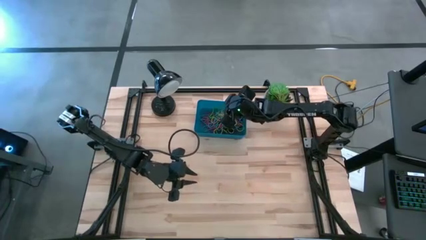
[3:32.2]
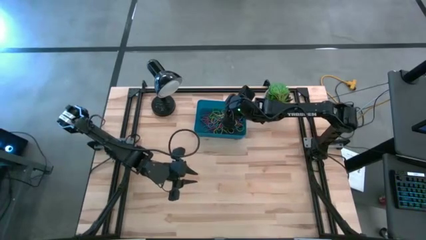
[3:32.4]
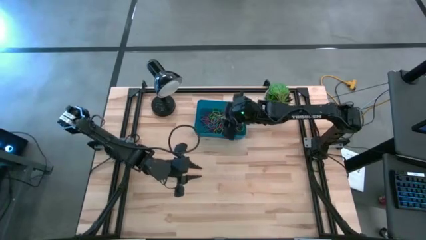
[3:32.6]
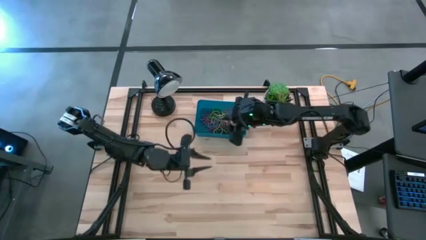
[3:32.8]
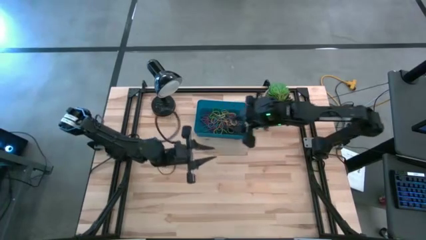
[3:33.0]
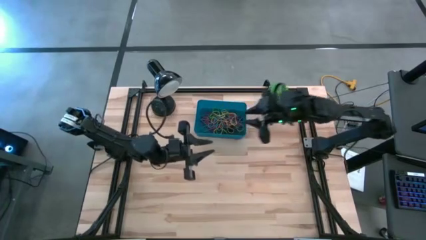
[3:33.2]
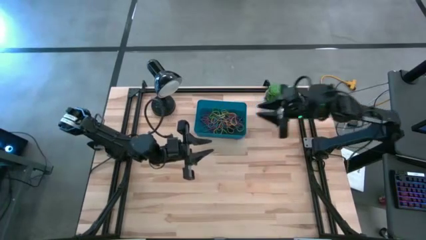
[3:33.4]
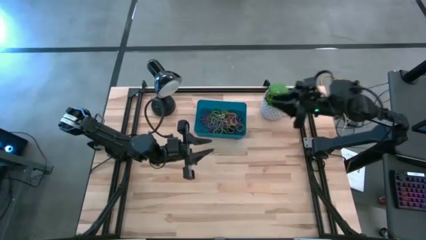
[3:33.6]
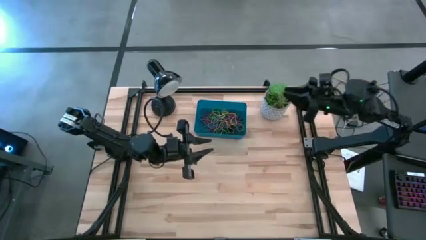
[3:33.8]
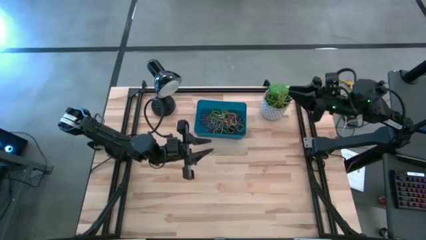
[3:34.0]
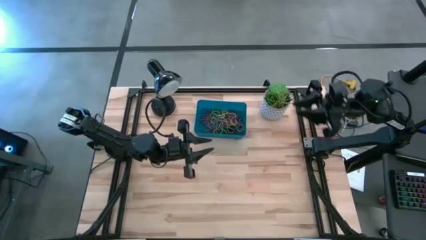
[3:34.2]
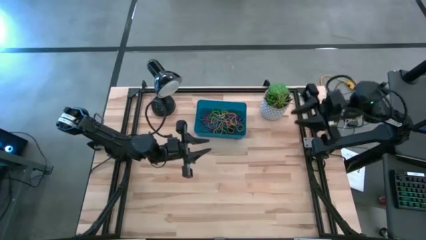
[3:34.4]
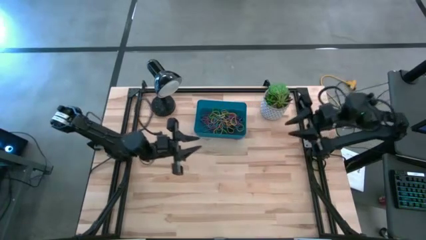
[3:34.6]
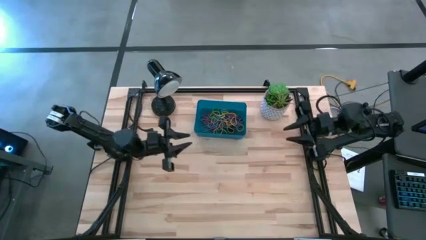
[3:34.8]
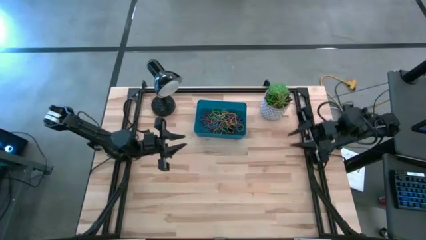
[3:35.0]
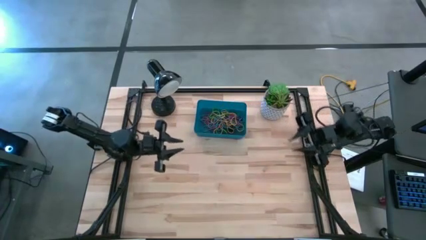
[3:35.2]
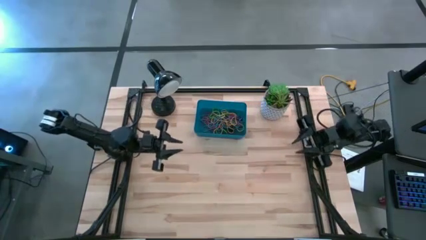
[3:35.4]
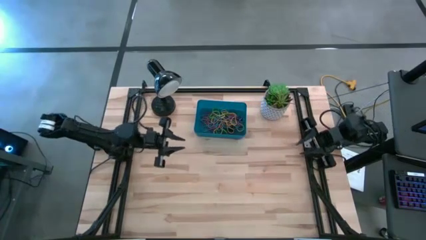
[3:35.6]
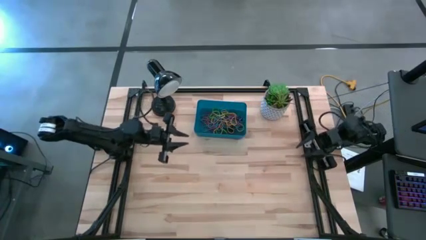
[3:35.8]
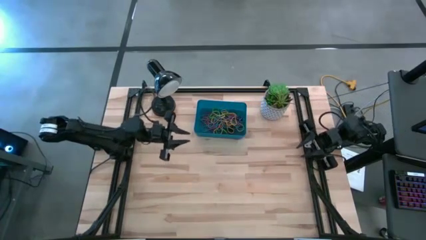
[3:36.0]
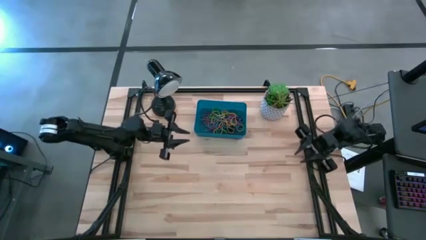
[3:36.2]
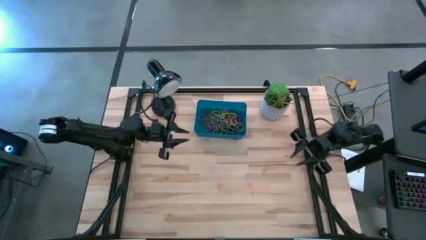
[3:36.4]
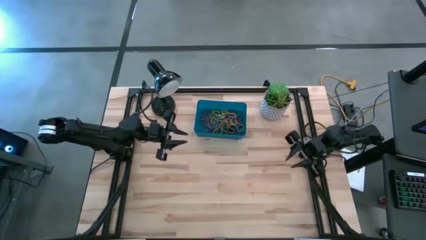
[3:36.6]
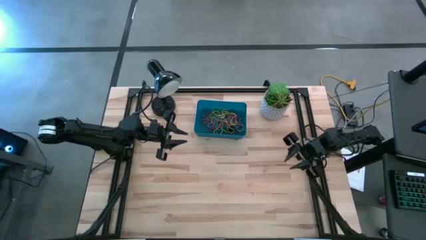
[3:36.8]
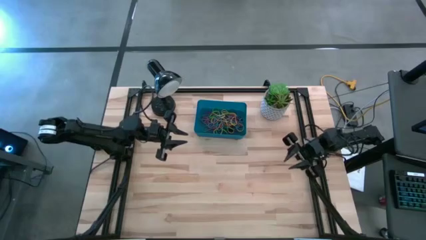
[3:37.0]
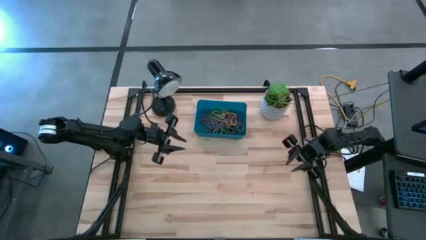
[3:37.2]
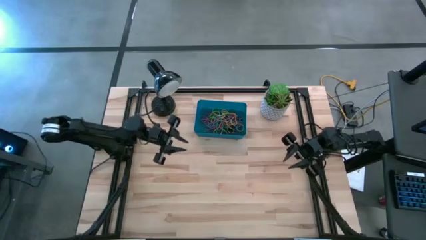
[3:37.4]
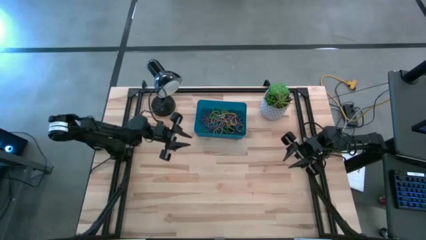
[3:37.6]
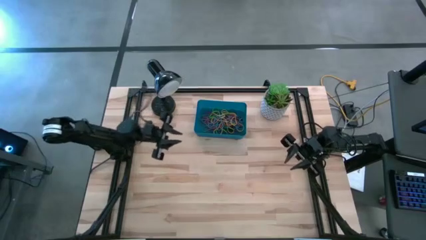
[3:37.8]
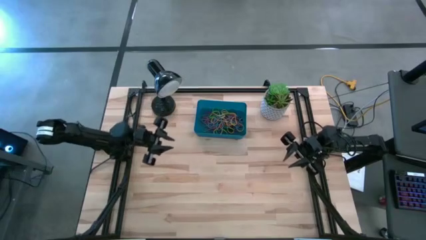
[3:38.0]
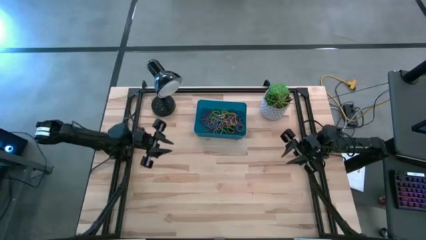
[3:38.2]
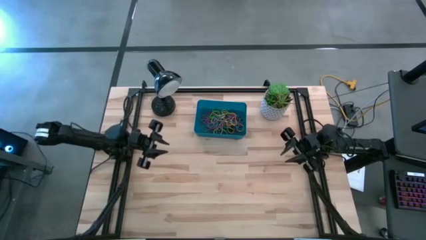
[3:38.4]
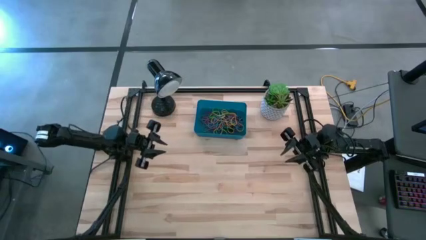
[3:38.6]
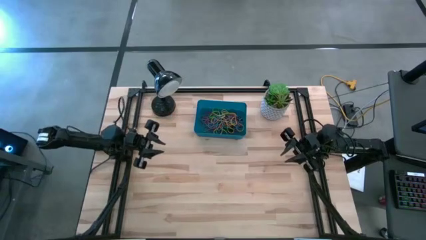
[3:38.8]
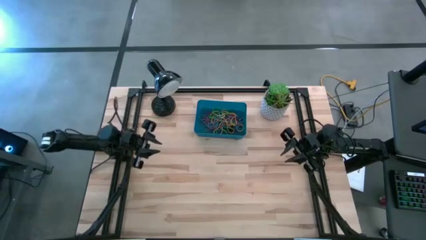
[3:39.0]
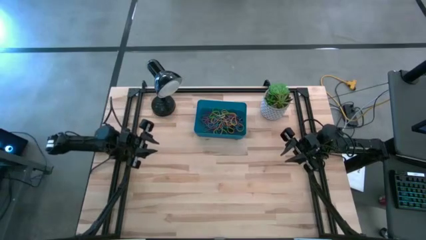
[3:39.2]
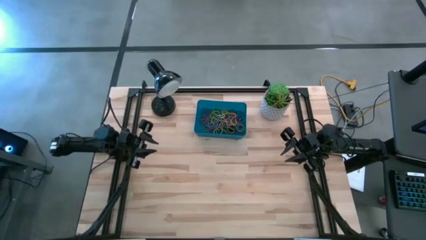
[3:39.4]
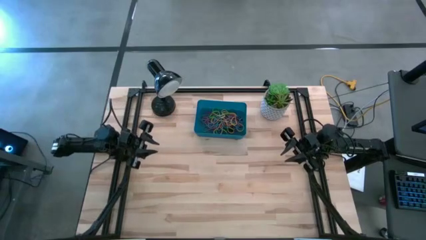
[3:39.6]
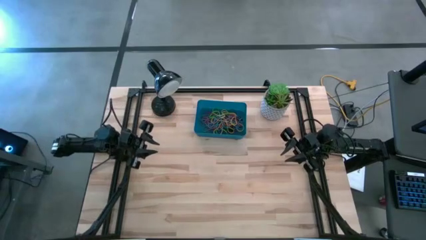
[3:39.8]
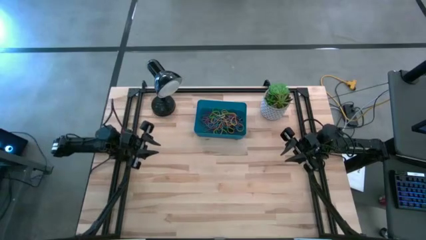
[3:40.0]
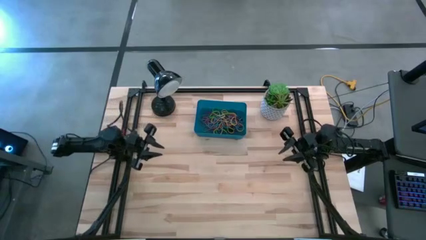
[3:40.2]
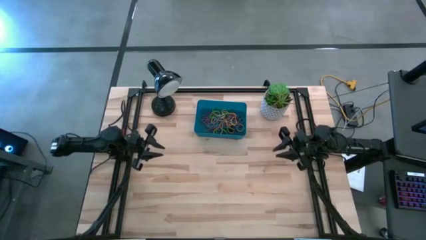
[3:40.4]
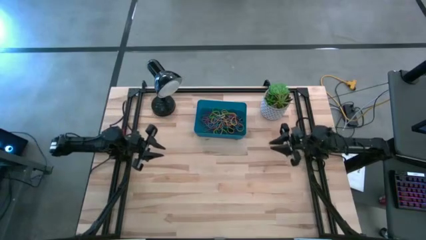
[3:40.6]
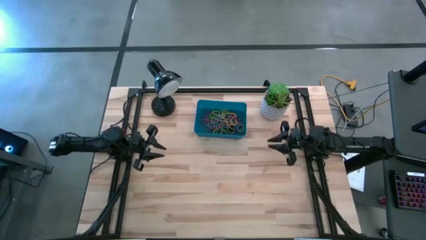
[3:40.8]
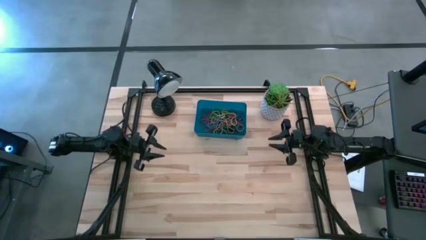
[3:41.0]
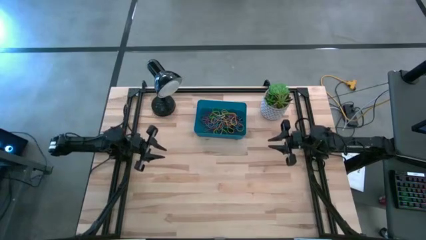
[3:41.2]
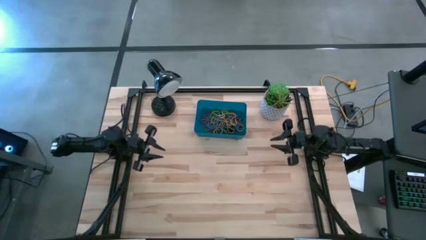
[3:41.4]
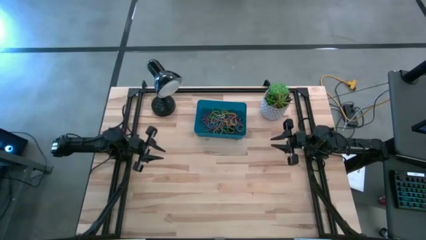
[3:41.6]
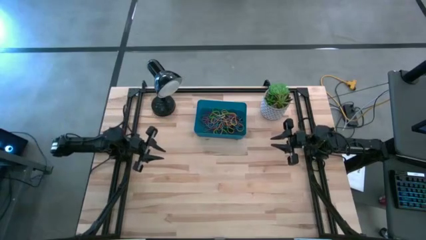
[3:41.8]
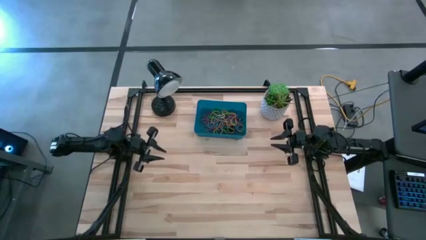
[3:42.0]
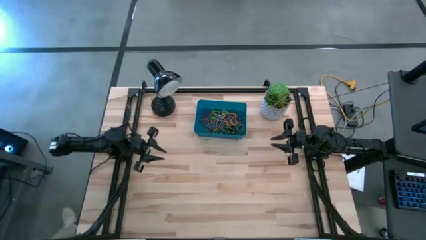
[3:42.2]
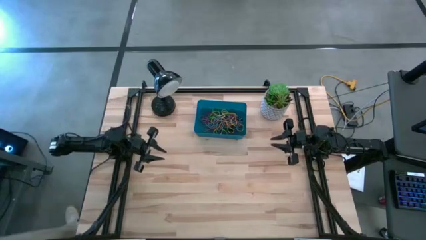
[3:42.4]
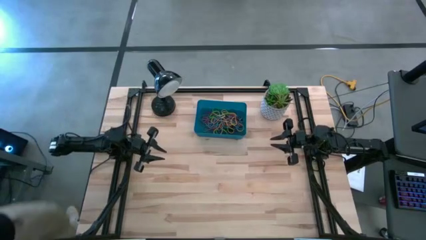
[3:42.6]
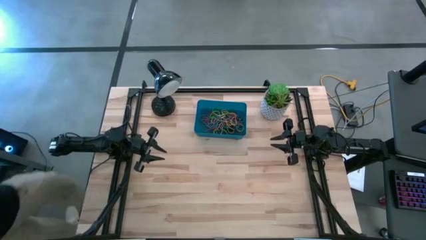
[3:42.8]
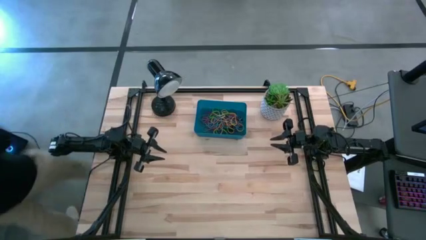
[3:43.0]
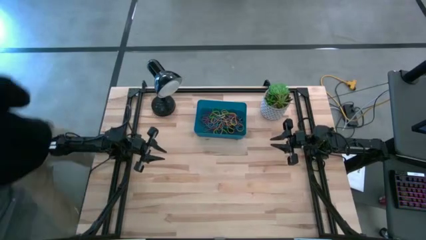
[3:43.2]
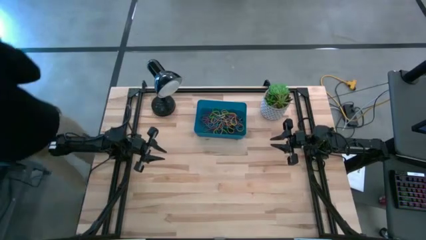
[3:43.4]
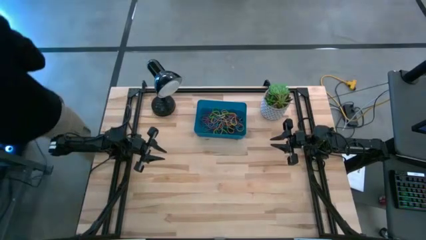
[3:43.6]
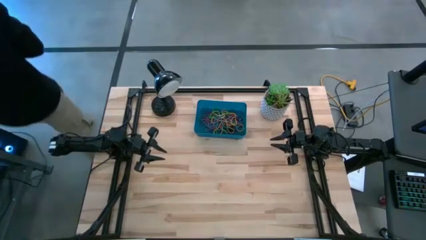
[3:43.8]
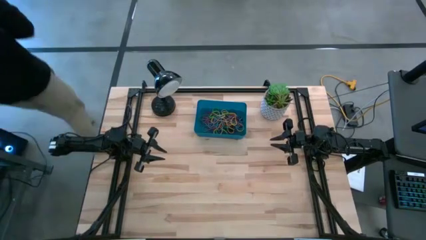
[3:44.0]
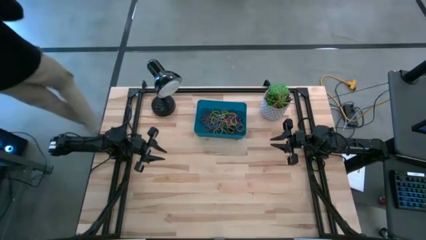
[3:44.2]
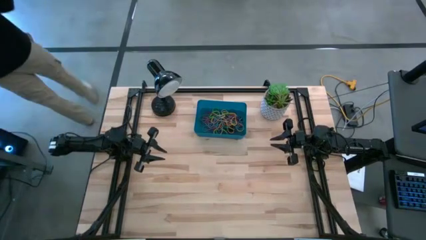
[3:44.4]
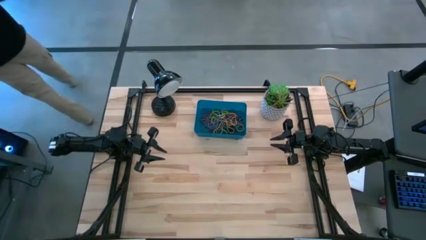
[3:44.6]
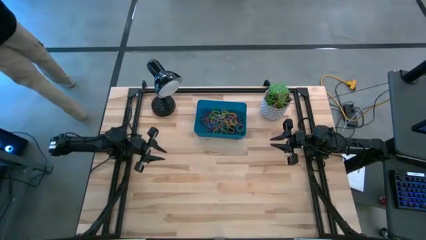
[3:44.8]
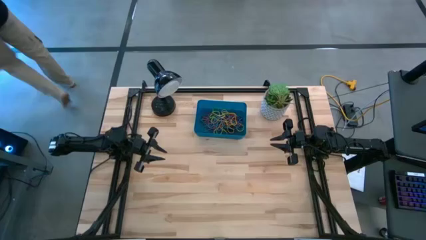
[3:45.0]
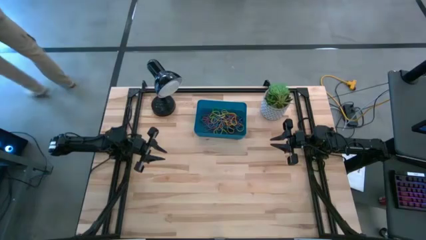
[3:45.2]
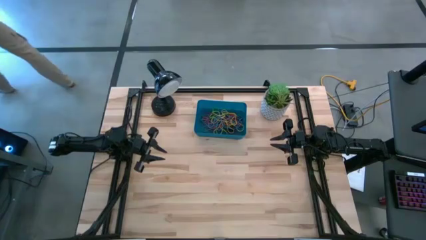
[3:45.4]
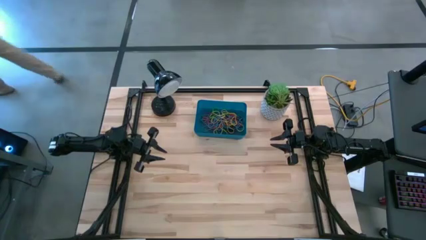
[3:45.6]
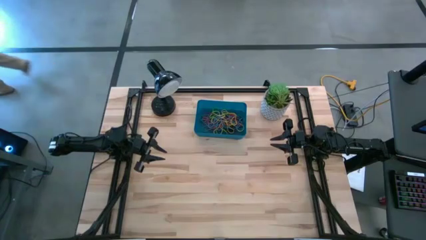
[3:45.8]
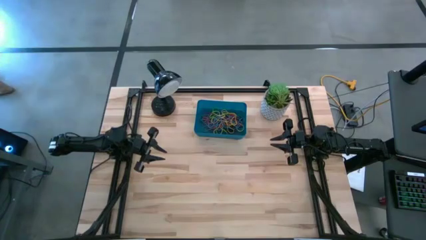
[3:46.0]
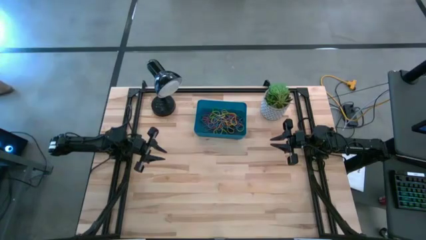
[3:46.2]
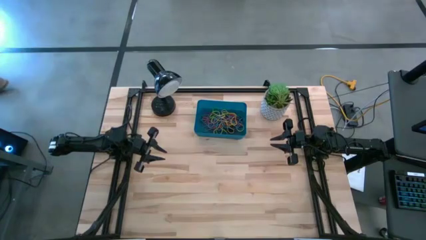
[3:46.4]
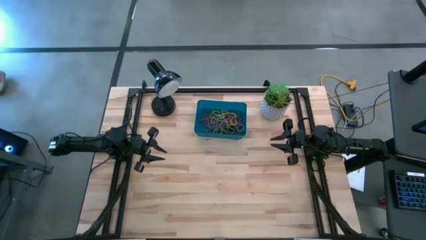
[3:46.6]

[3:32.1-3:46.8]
Task: Pick and place rubber bands into bin
Return to Home Position
